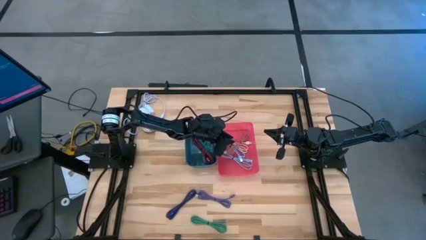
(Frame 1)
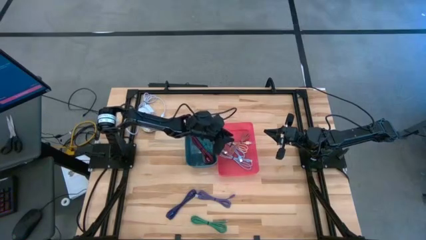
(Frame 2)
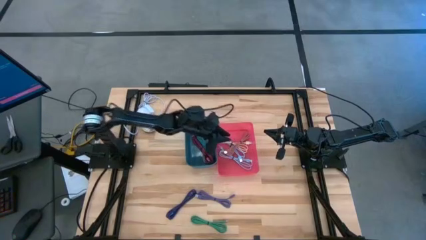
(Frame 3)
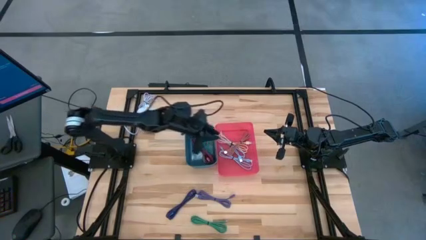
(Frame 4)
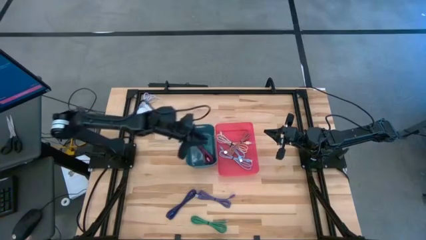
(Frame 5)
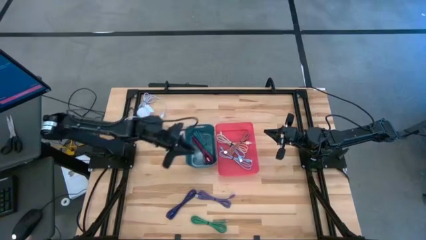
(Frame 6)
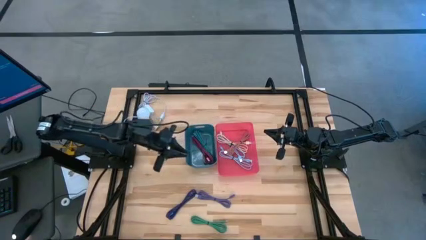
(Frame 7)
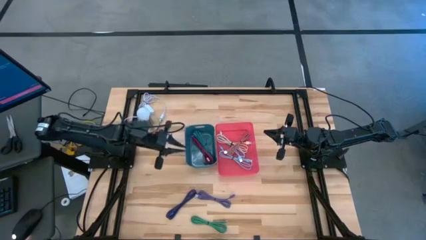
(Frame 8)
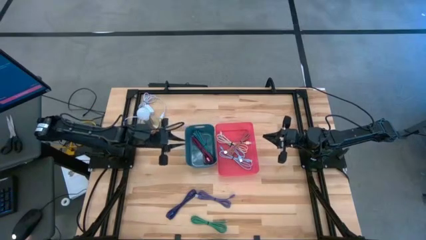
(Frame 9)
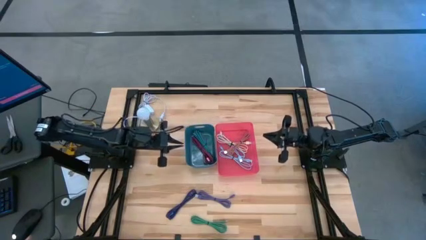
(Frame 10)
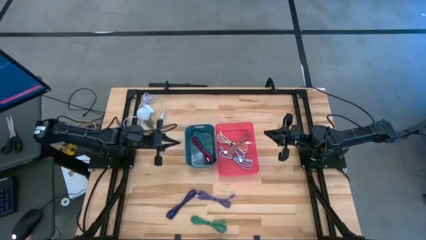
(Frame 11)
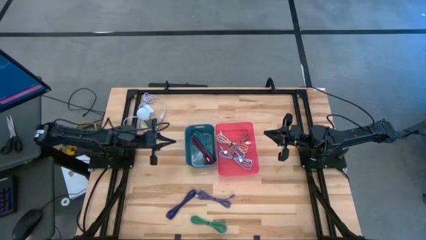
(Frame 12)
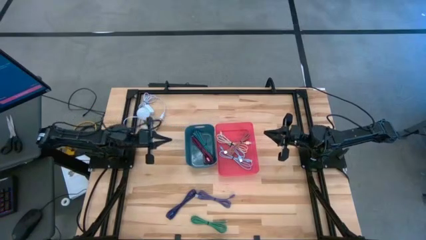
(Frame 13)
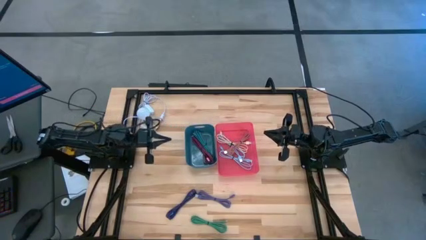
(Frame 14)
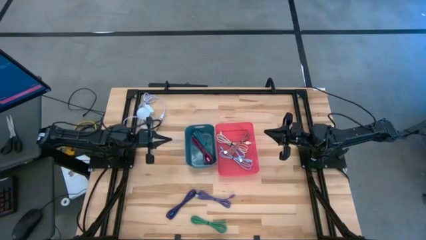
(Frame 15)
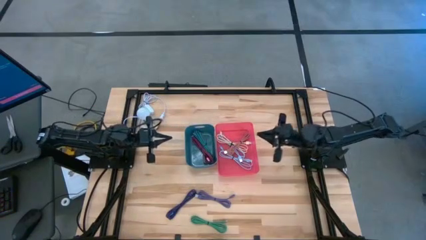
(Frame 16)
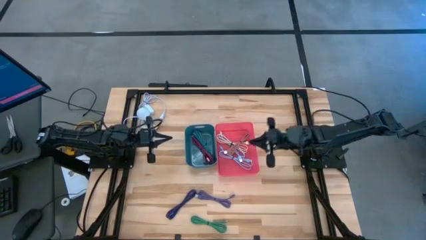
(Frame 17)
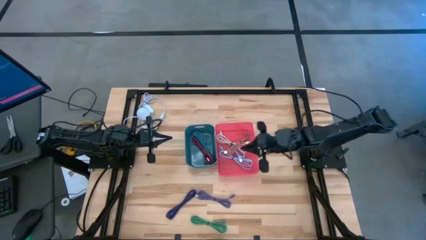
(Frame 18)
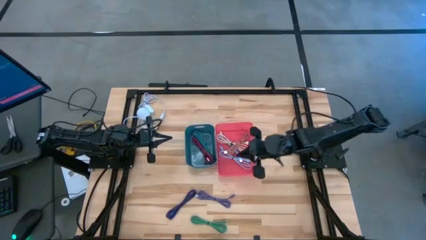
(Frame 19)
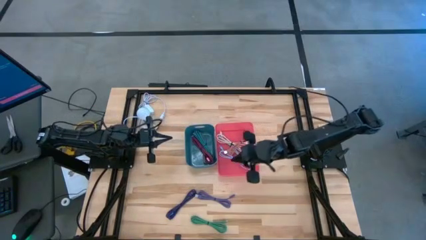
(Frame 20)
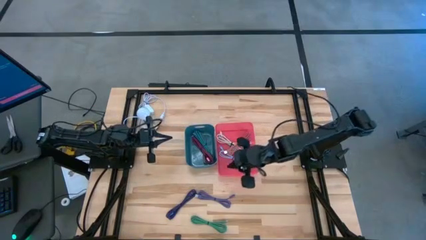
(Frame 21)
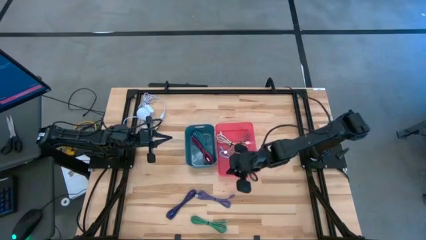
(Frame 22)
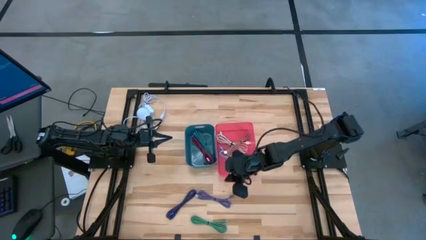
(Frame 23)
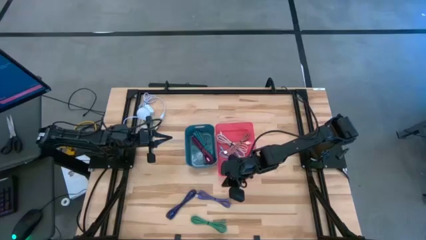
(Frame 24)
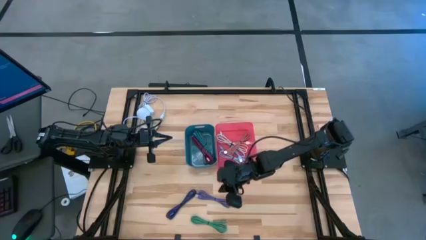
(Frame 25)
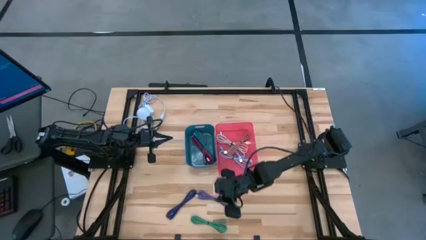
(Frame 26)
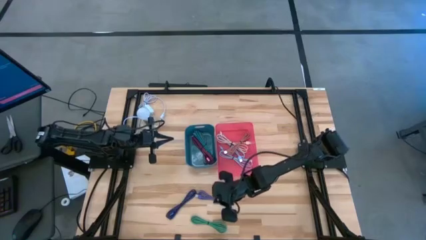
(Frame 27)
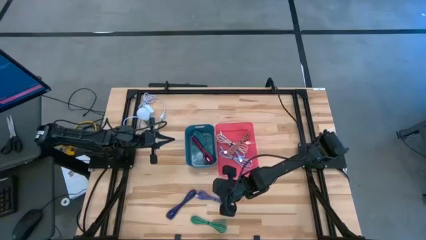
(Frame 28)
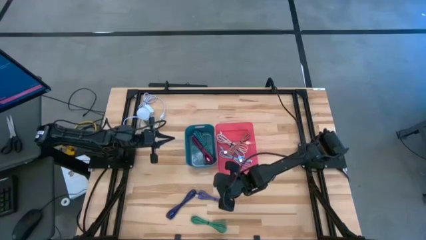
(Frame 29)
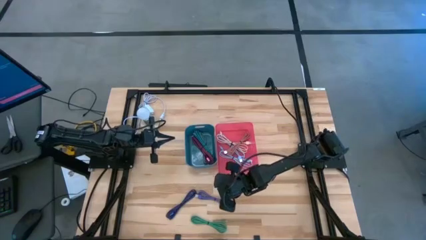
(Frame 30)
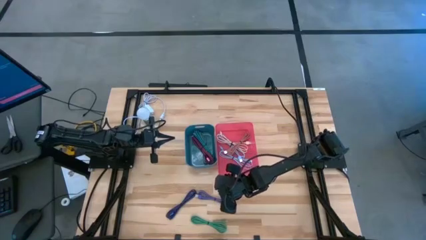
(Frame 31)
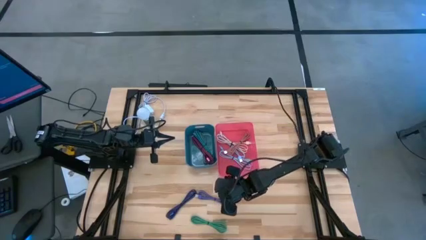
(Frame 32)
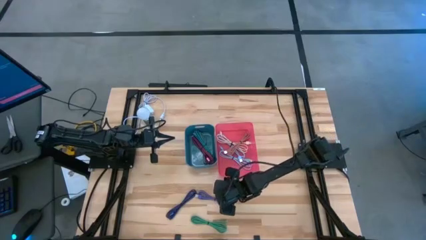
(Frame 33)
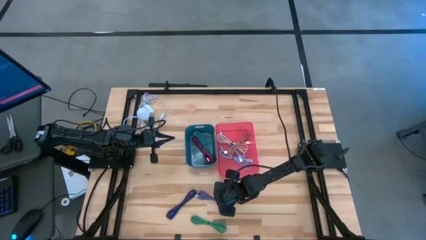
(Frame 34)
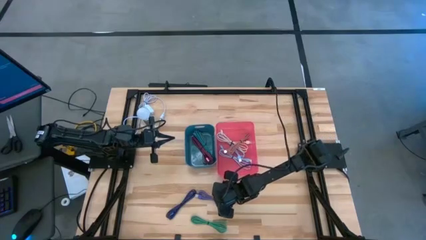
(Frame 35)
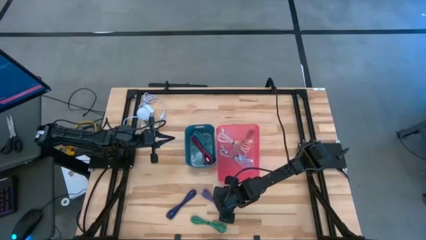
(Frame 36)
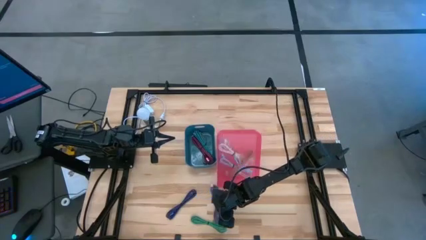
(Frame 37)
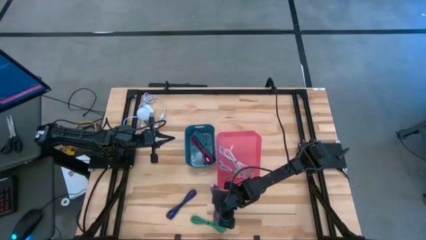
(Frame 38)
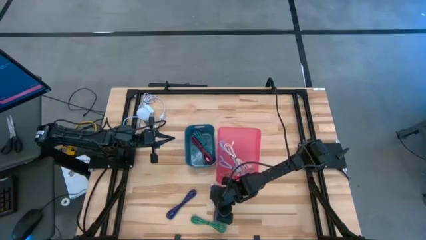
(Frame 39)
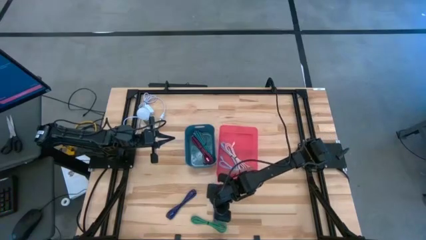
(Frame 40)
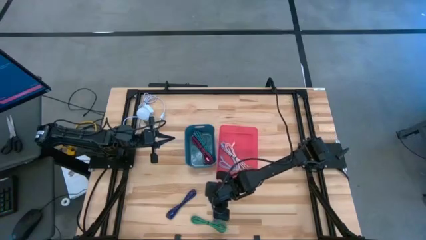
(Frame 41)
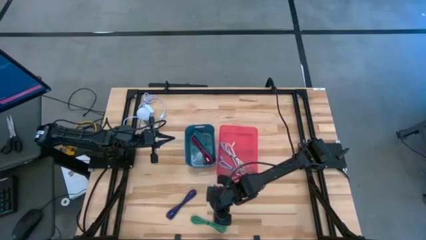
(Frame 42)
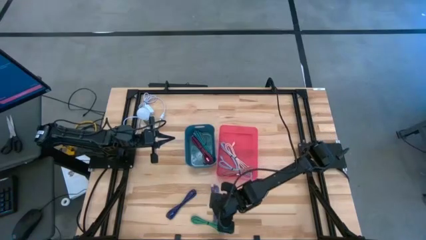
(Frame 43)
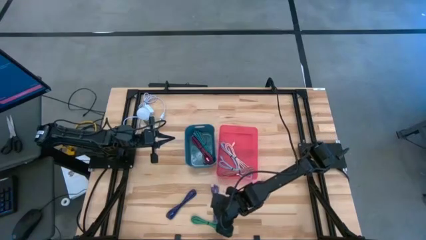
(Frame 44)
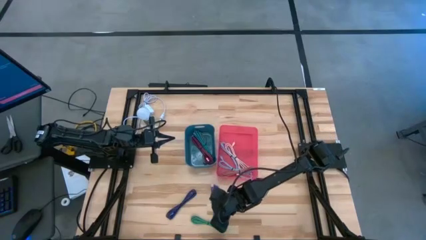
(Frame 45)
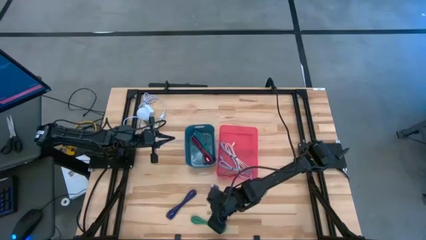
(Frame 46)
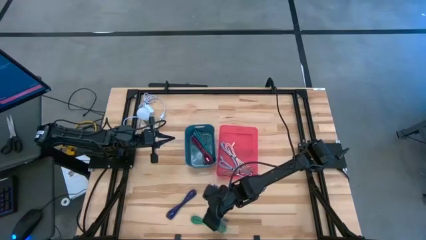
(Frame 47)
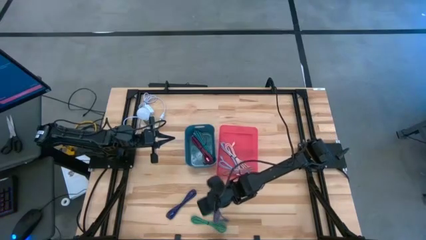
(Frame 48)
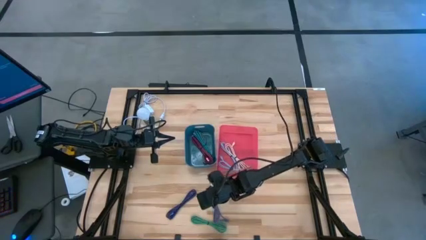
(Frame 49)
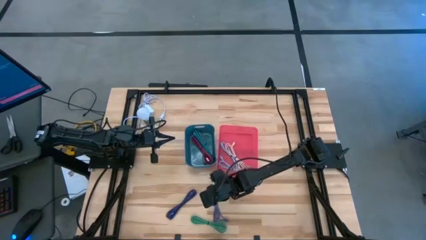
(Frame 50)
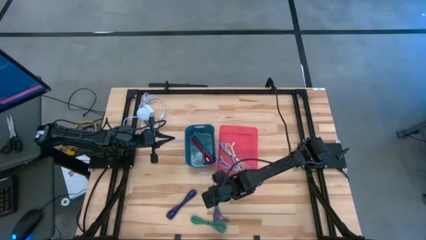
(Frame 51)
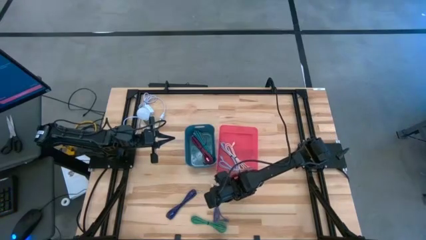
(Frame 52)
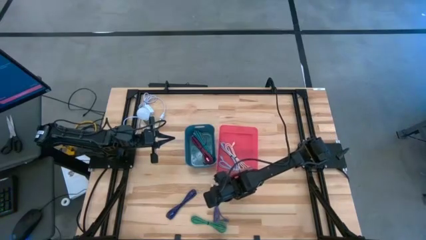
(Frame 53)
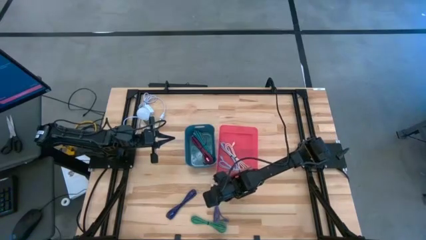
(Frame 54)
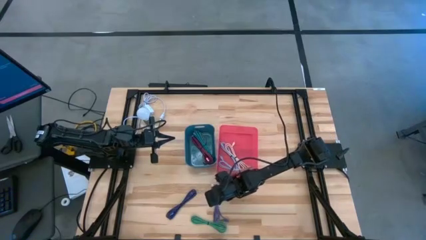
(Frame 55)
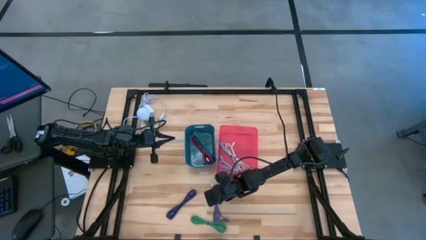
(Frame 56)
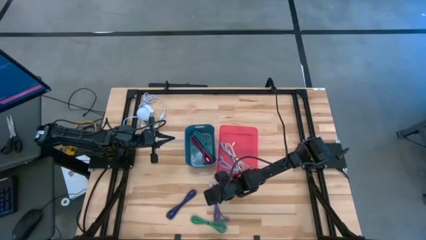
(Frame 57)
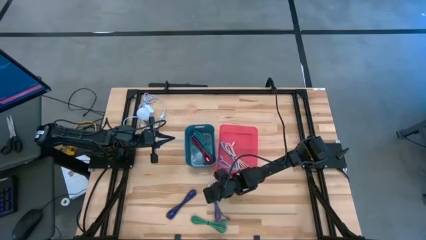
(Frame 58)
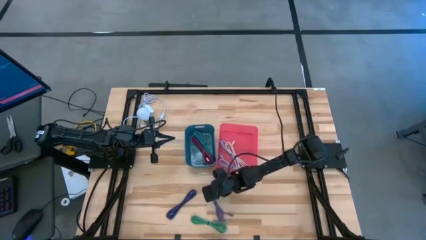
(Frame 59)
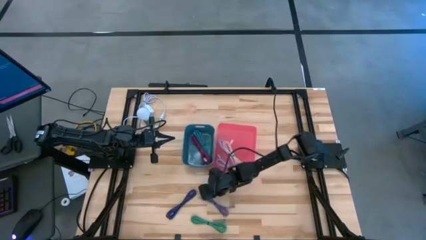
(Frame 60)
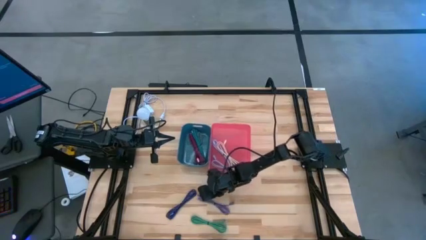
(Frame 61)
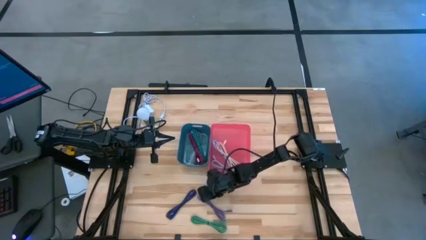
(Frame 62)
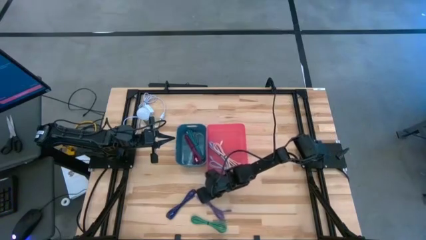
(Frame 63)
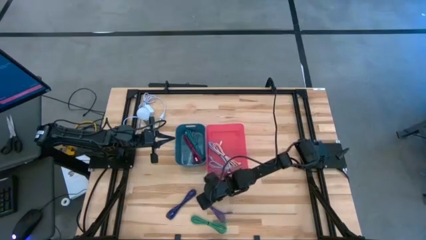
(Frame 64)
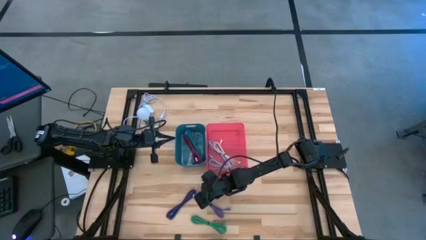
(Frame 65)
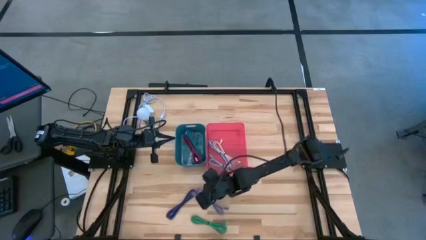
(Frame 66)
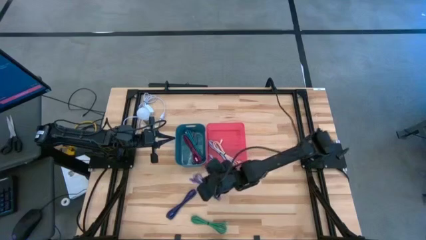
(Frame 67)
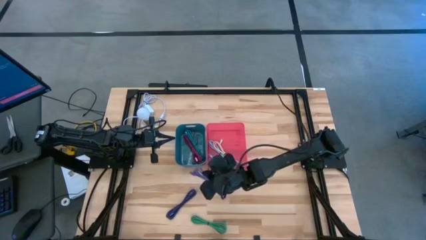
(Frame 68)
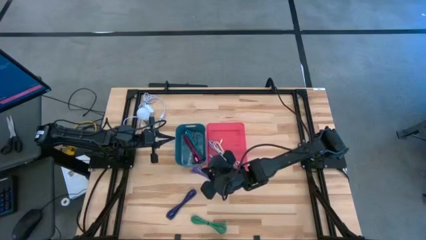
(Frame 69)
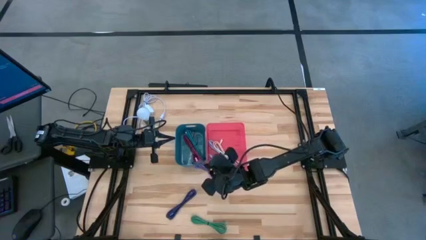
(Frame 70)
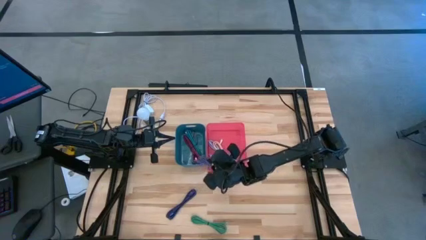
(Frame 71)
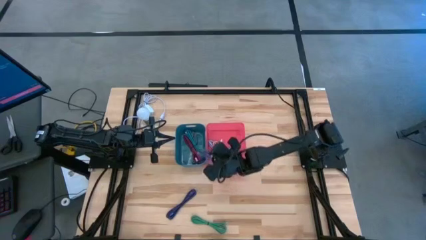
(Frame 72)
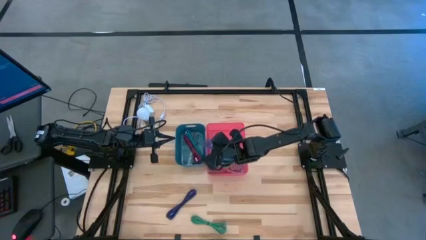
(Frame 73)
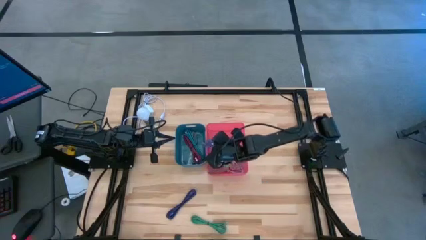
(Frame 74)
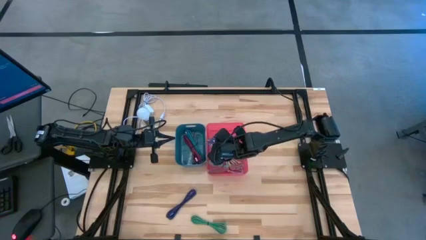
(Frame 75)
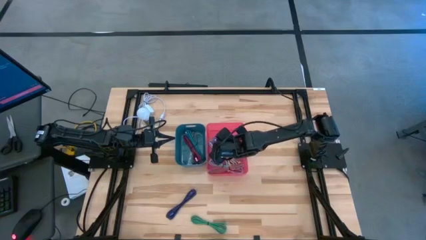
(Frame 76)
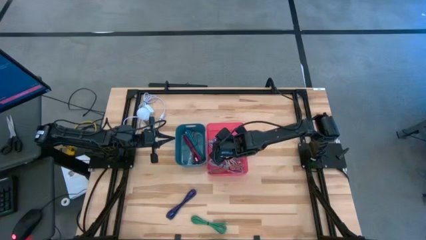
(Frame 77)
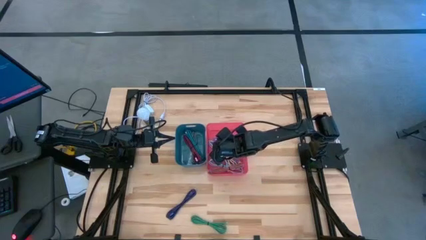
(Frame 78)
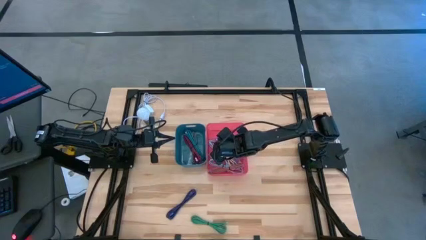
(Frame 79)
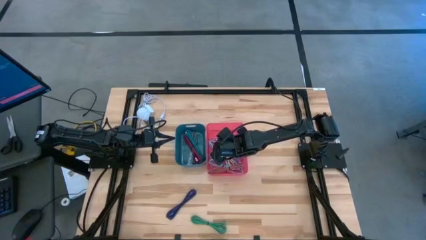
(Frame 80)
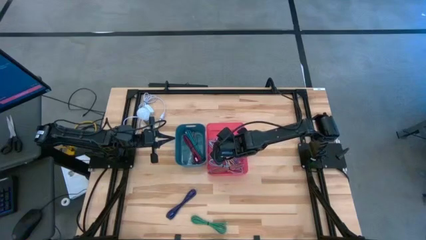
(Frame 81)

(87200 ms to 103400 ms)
Task: Pick & Place USB Port
Put the purple charger cable into the red bin
